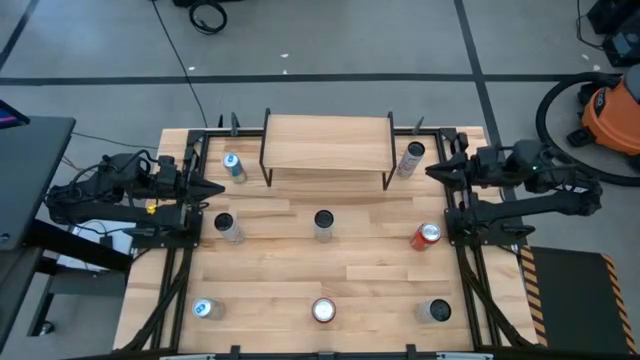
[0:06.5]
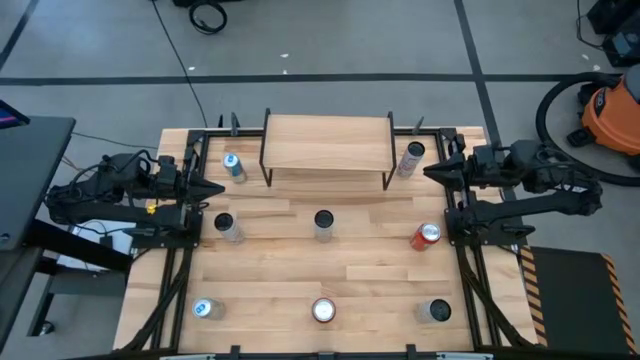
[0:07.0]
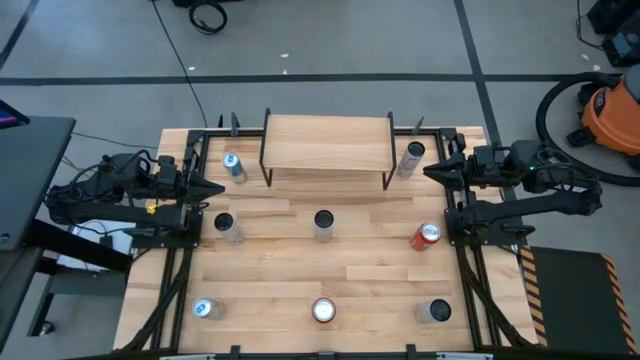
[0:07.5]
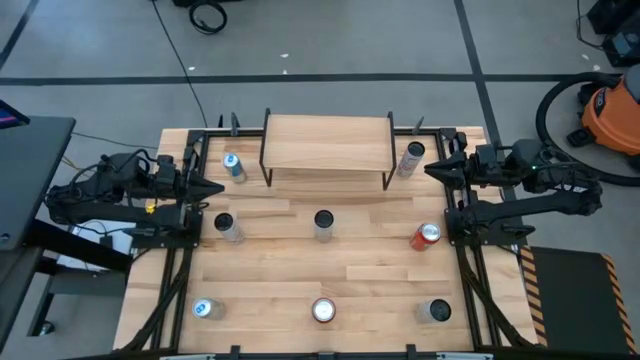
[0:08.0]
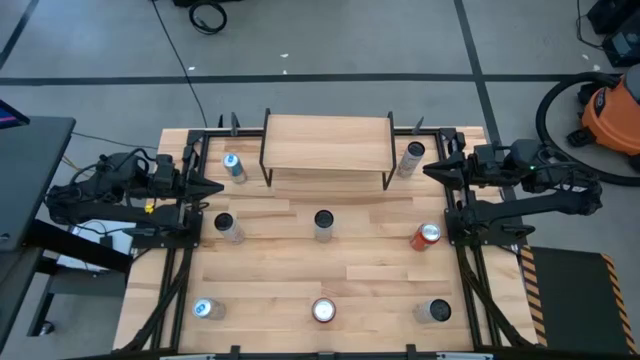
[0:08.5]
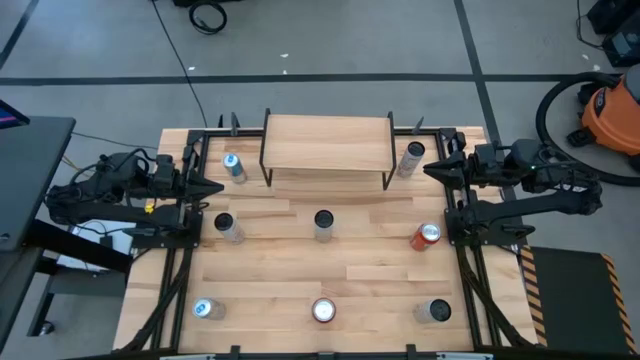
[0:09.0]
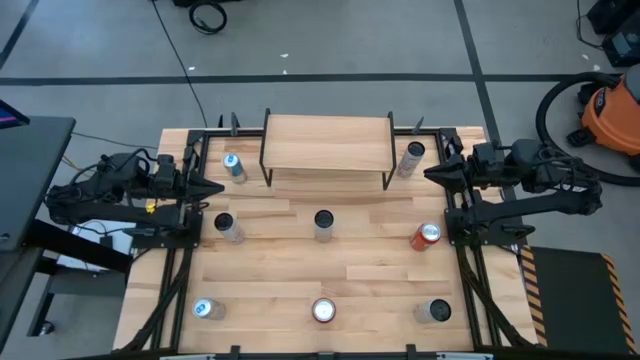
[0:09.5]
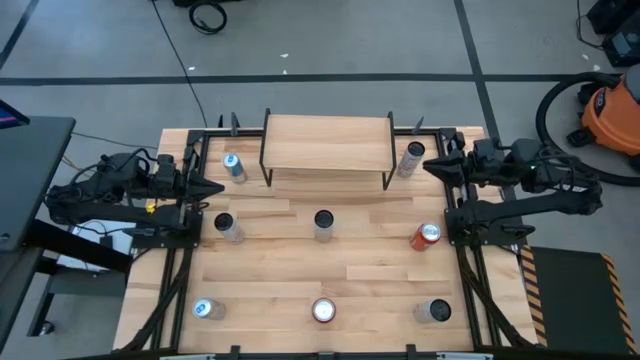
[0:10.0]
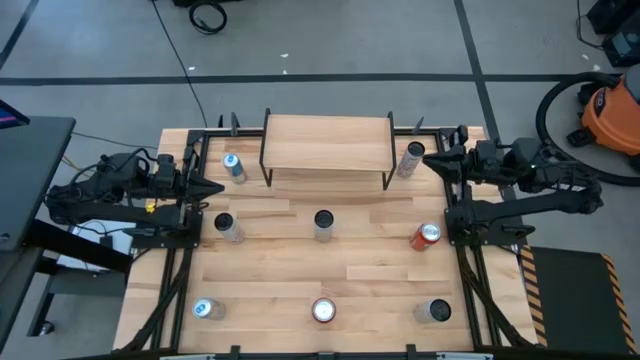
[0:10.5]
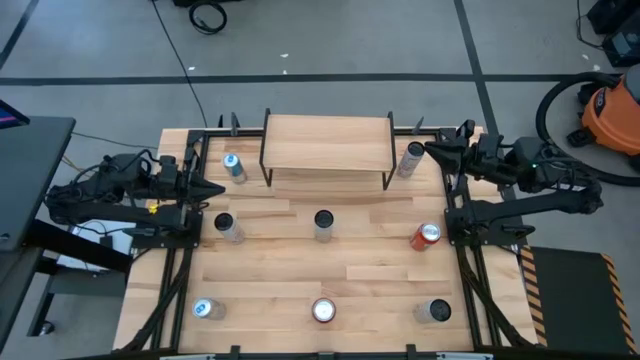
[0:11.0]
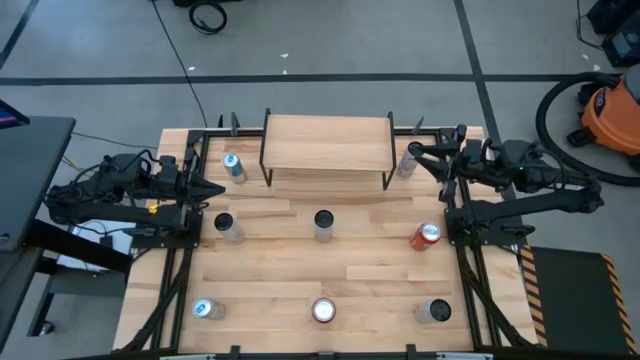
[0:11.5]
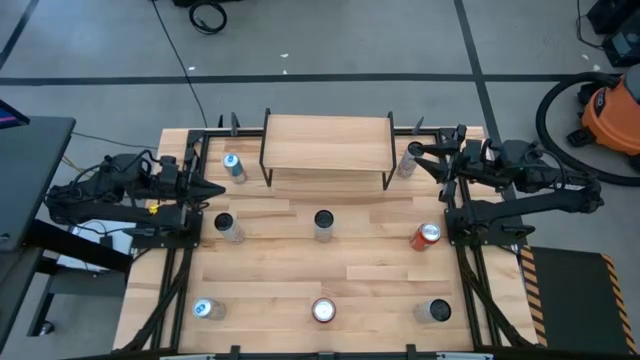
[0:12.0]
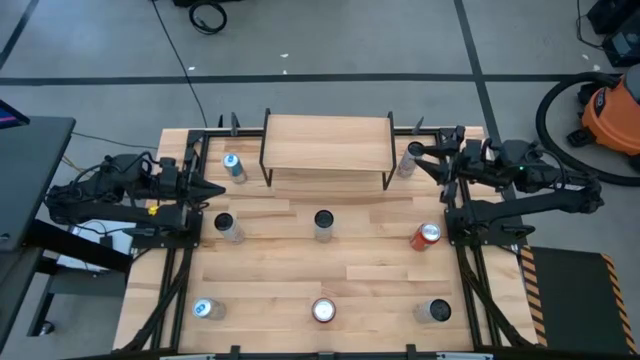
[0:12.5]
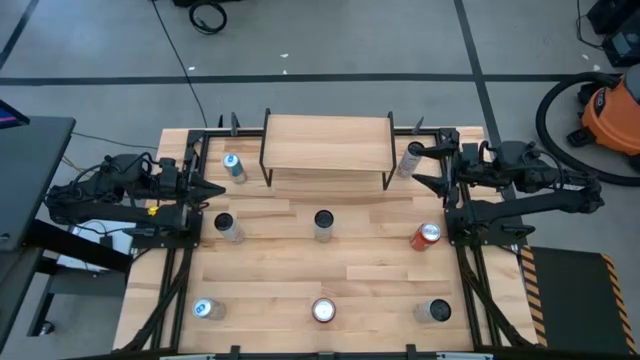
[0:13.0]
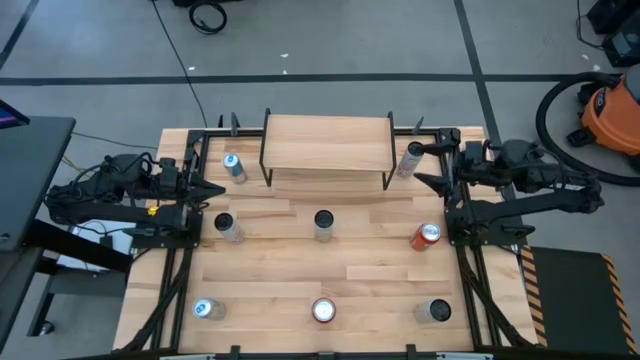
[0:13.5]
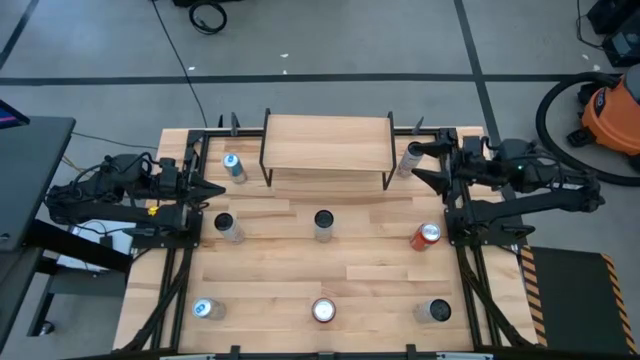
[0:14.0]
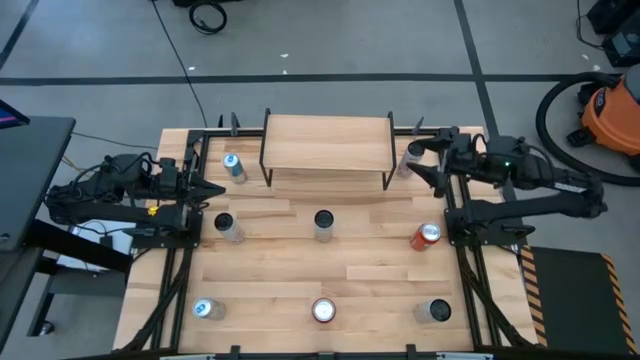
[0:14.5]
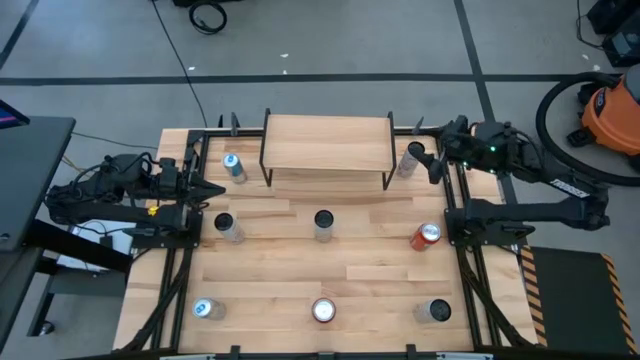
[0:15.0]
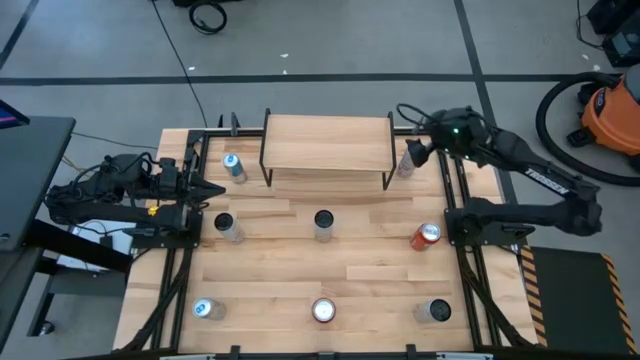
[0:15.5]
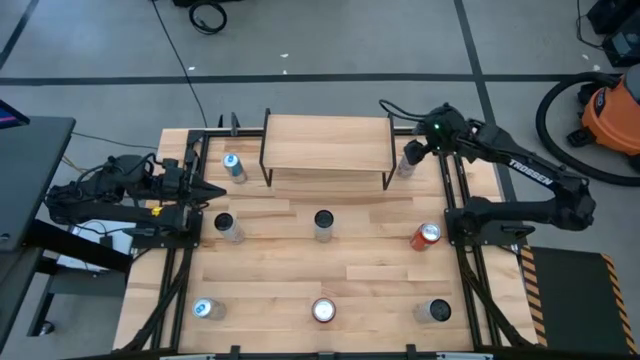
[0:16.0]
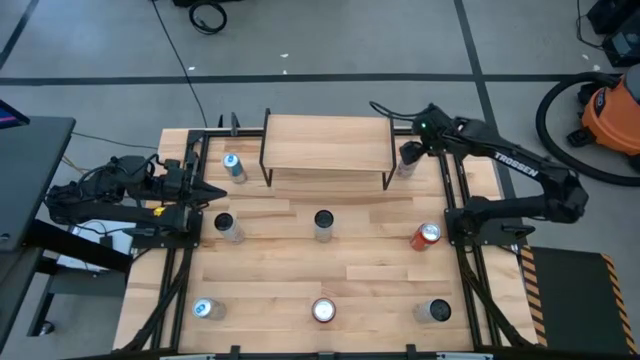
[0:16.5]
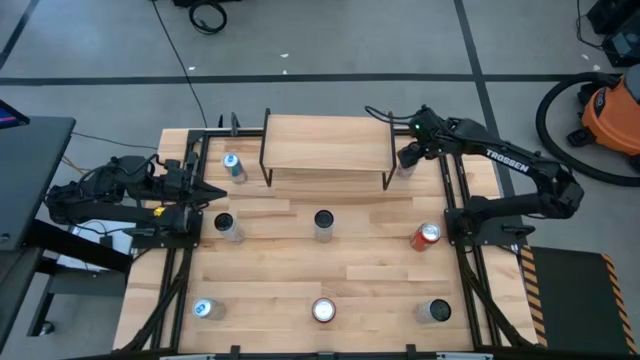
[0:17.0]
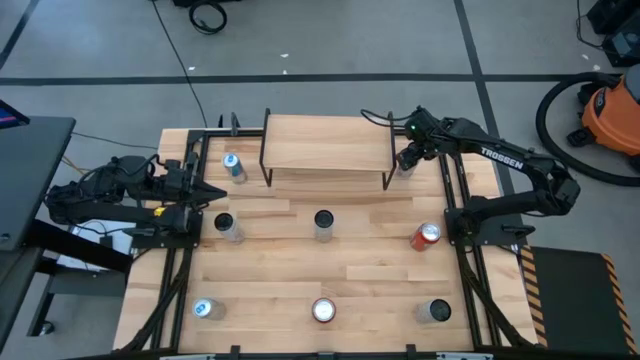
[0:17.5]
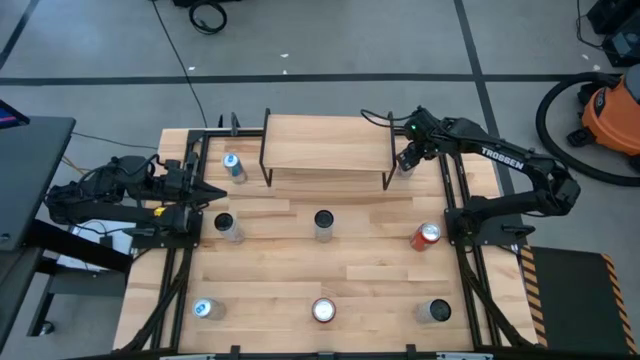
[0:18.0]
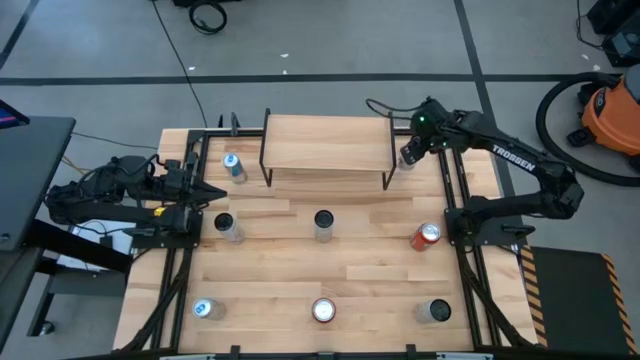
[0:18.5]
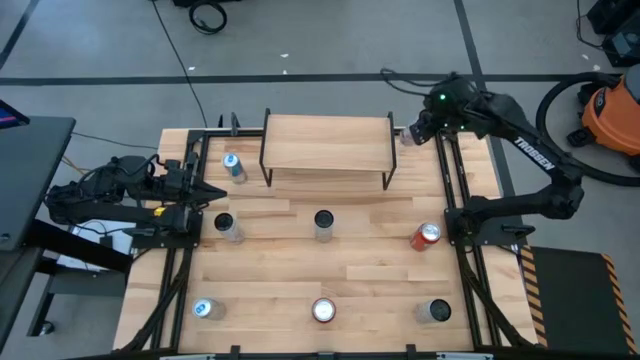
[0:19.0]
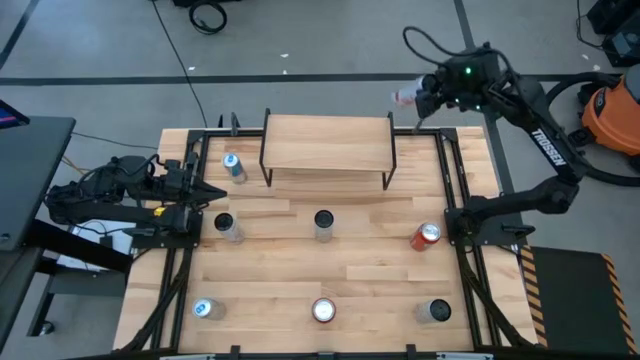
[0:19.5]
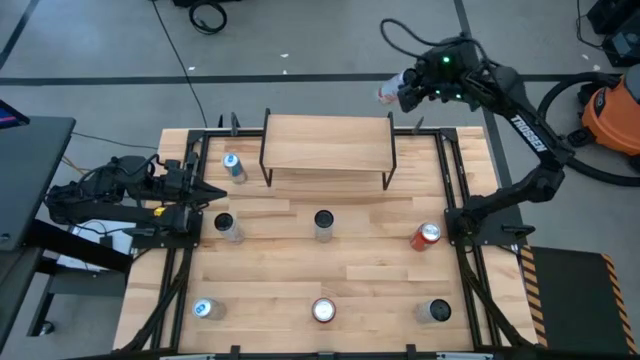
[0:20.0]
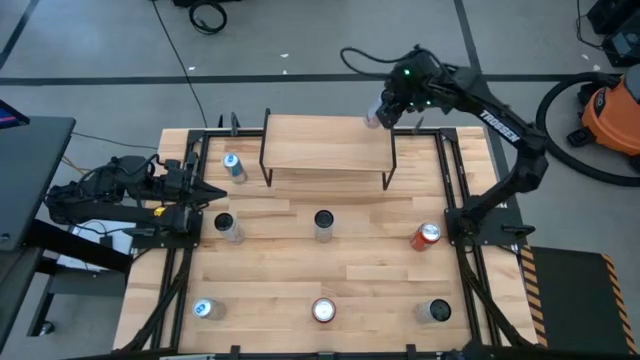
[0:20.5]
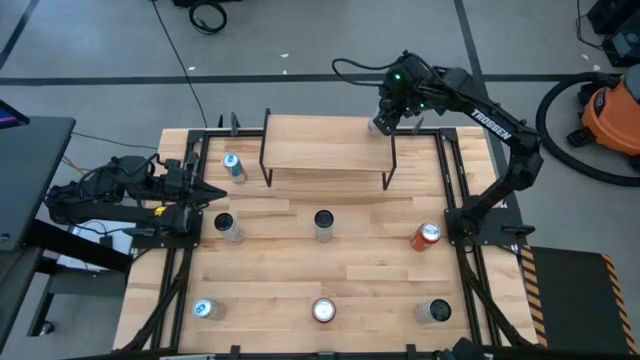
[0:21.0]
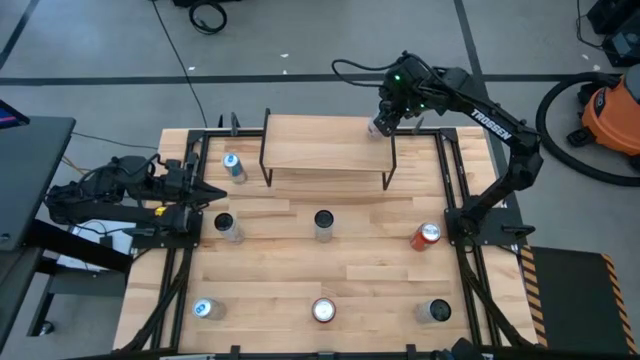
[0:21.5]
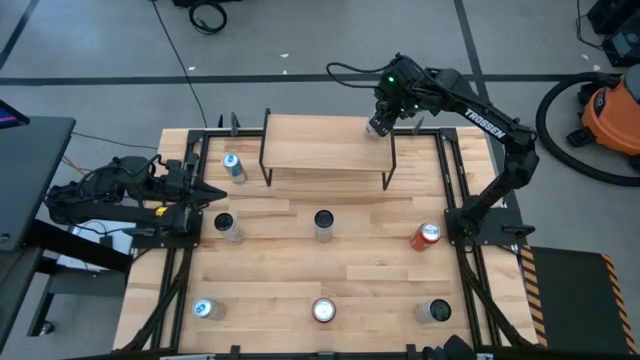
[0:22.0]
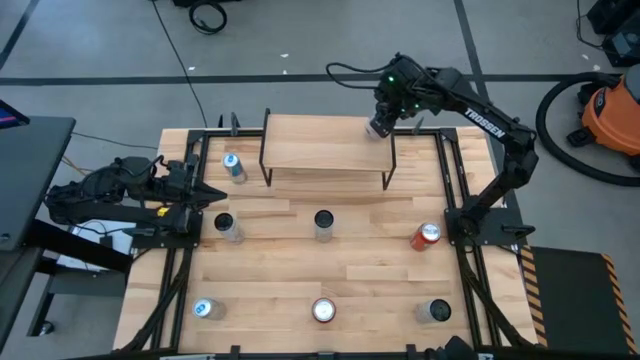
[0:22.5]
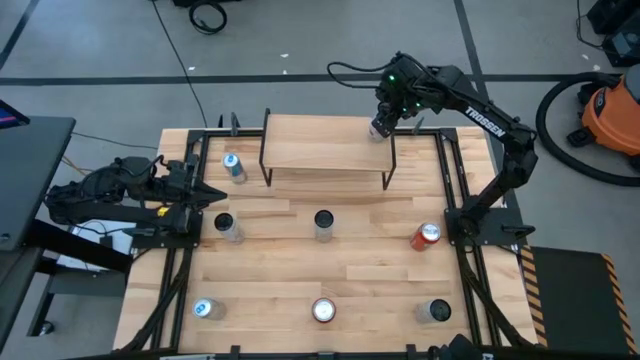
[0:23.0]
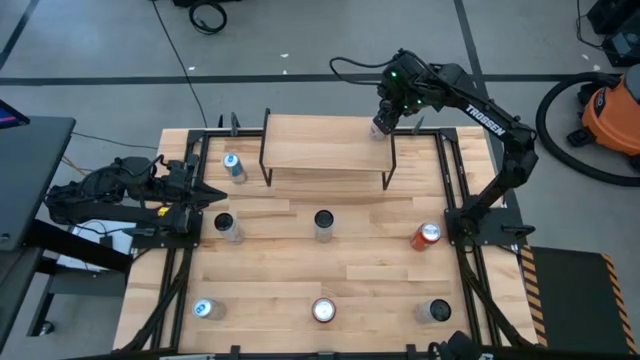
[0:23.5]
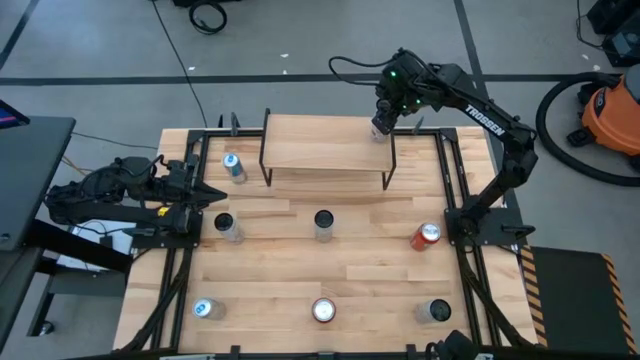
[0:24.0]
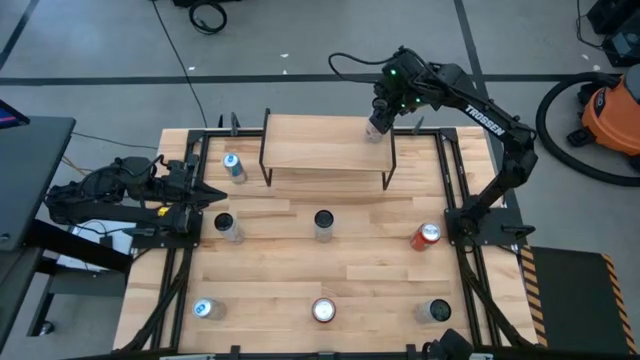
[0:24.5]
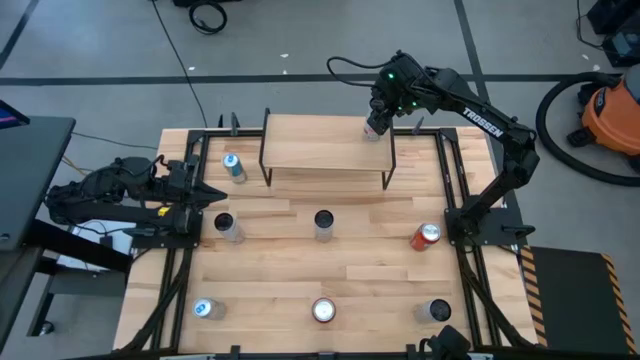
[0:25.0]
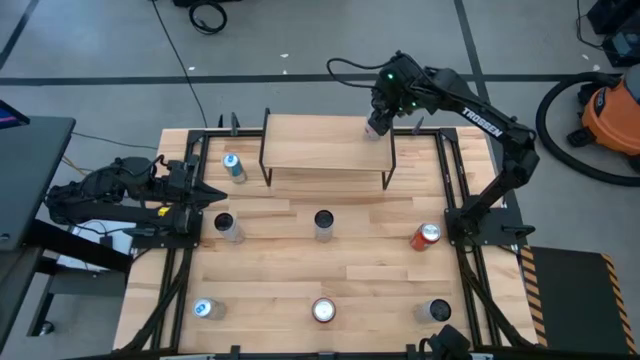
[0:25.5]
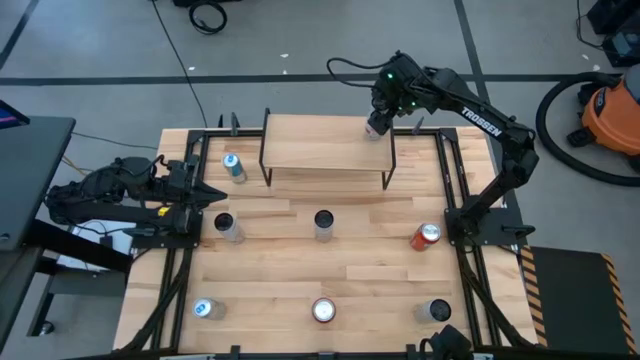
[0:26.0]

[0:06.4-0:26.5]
Task: Place canned beverage on shelf
Put the right white pink soda can on the shelf
